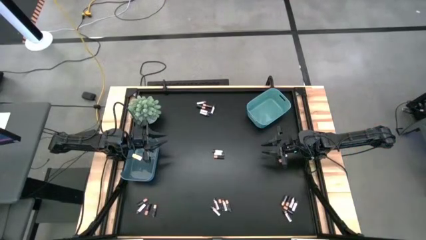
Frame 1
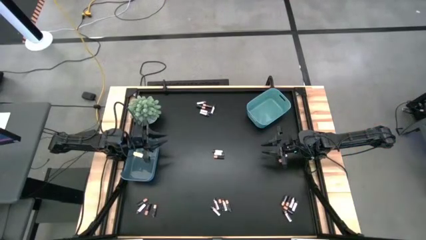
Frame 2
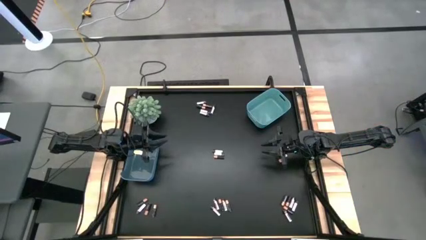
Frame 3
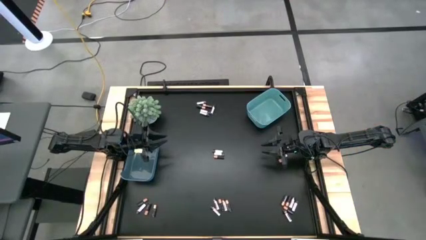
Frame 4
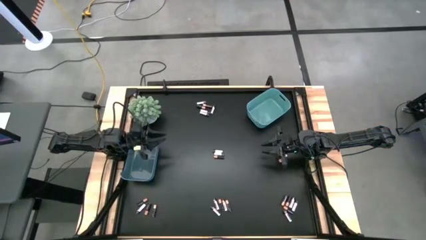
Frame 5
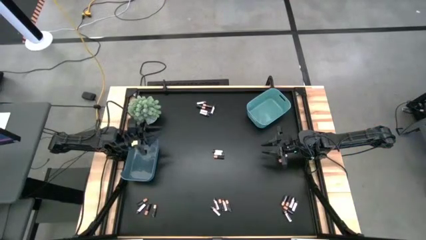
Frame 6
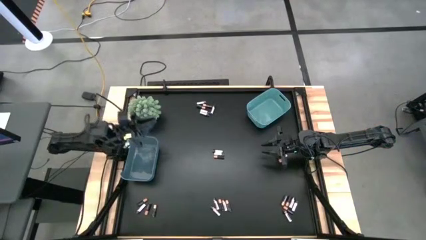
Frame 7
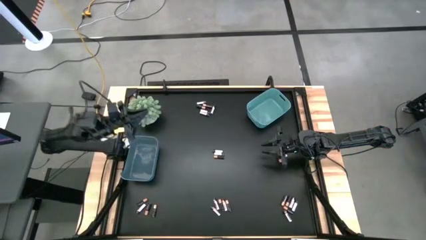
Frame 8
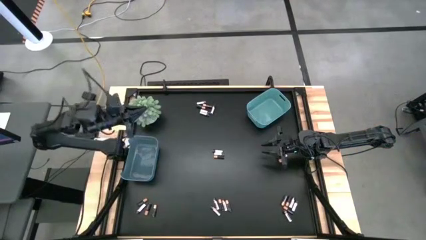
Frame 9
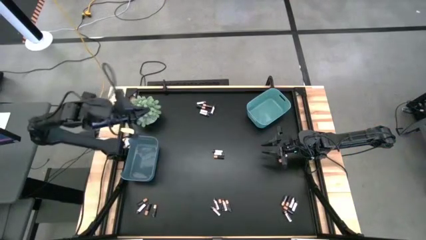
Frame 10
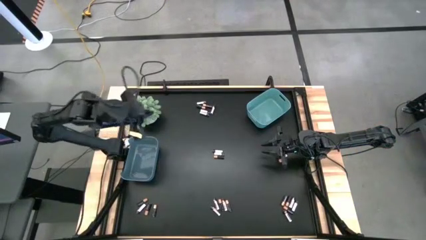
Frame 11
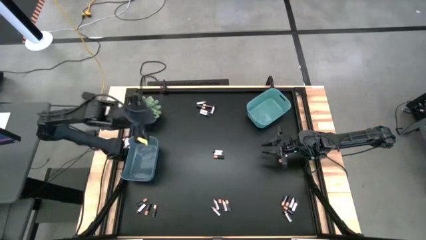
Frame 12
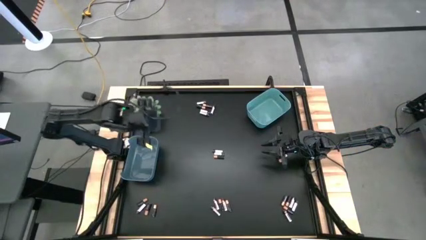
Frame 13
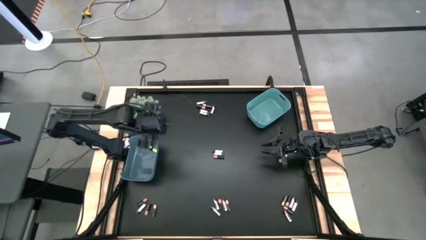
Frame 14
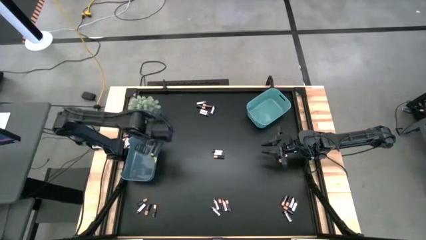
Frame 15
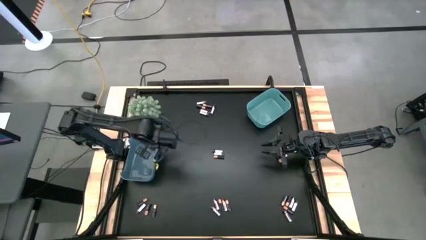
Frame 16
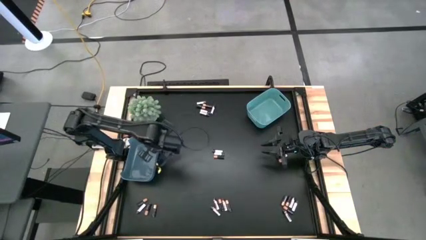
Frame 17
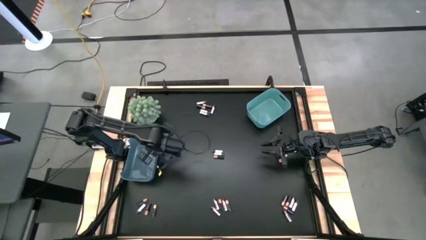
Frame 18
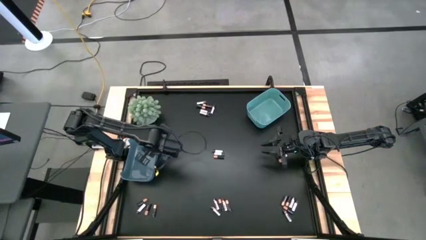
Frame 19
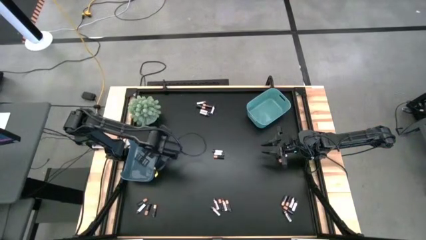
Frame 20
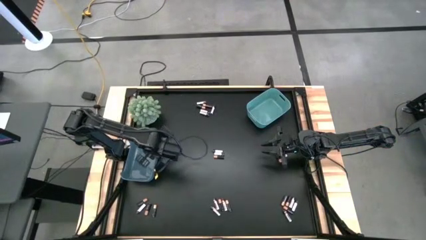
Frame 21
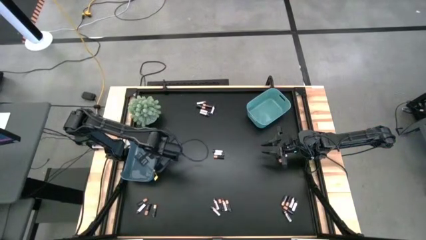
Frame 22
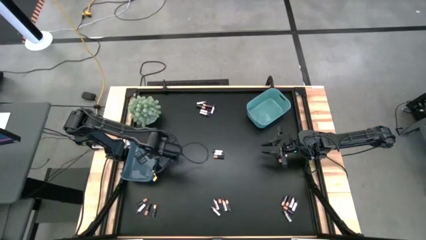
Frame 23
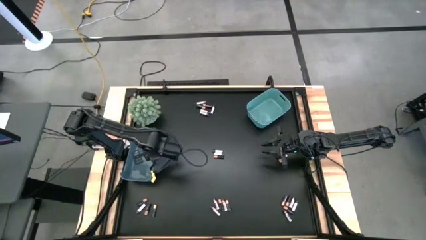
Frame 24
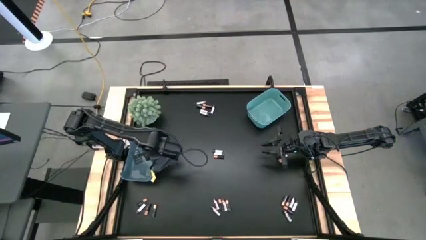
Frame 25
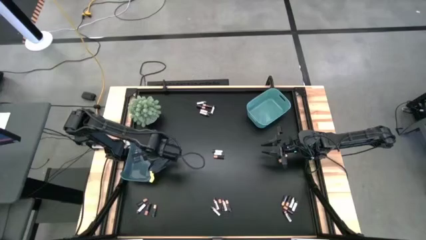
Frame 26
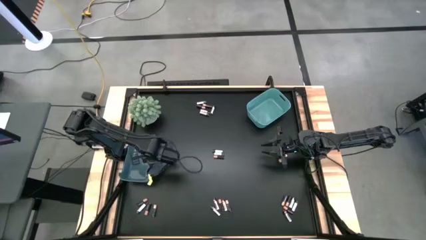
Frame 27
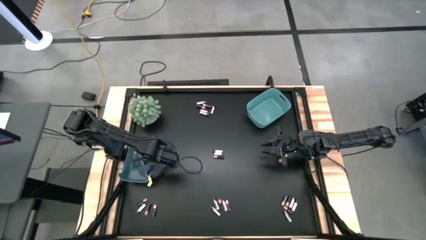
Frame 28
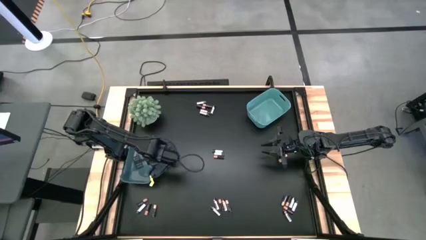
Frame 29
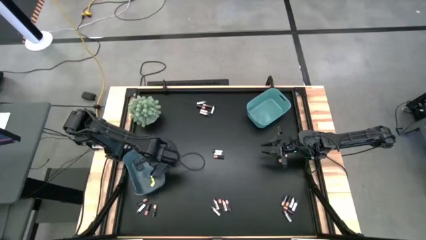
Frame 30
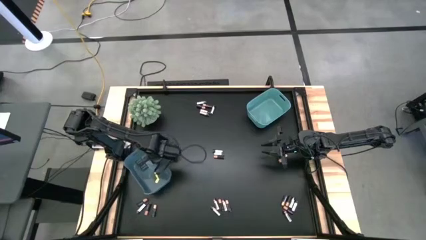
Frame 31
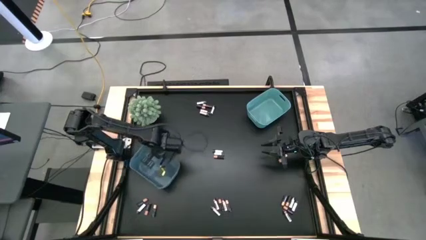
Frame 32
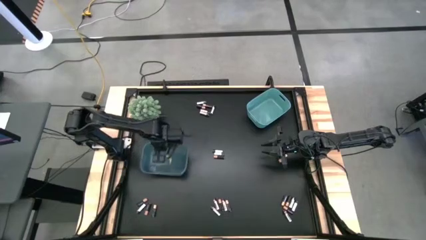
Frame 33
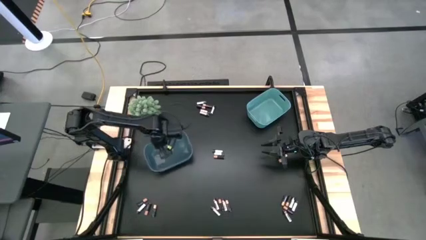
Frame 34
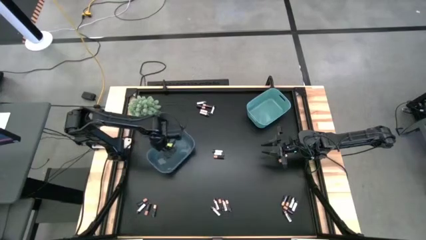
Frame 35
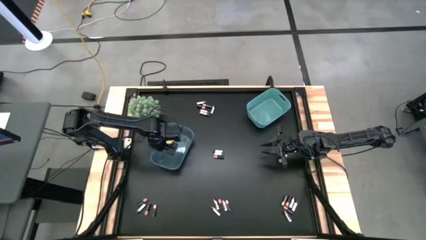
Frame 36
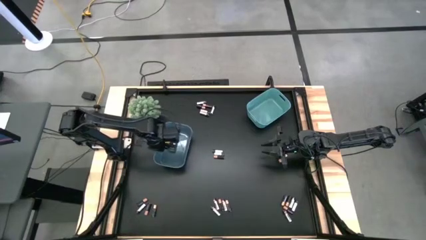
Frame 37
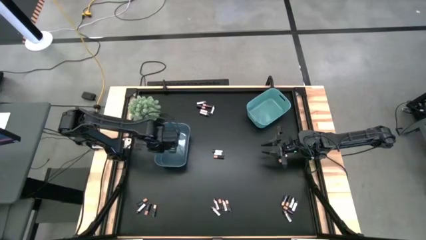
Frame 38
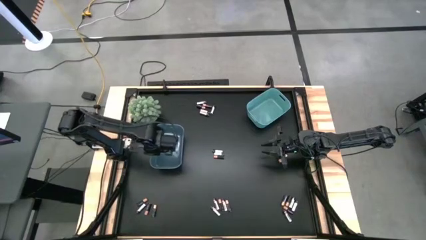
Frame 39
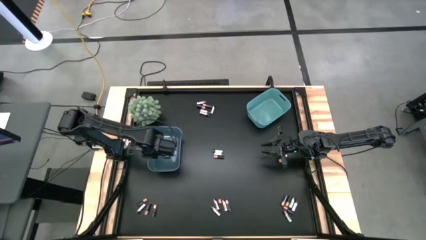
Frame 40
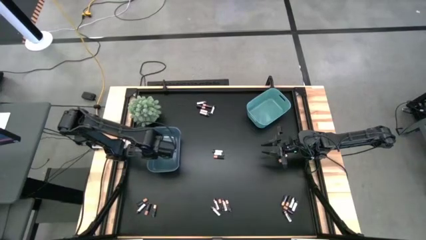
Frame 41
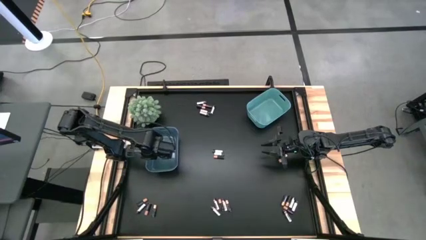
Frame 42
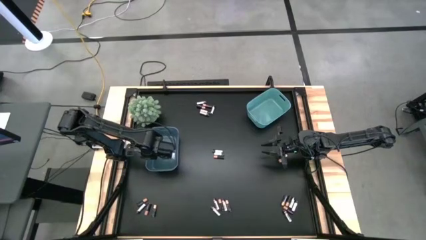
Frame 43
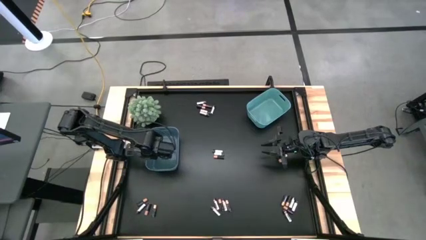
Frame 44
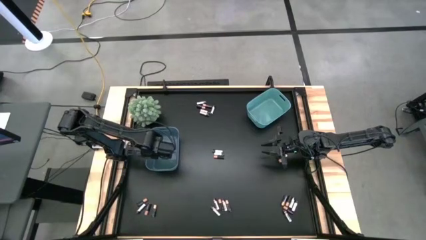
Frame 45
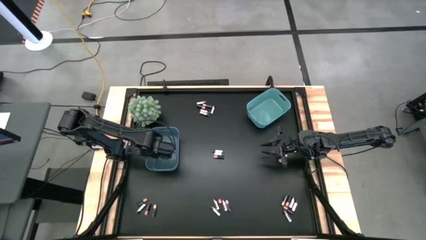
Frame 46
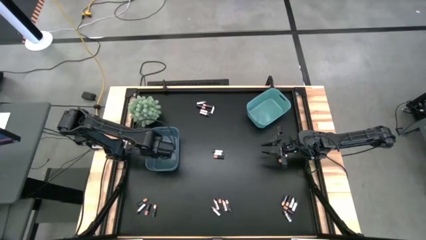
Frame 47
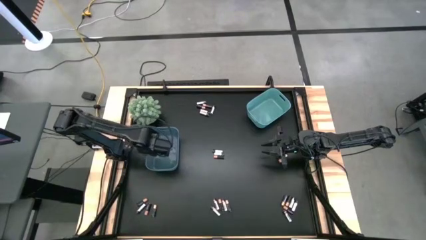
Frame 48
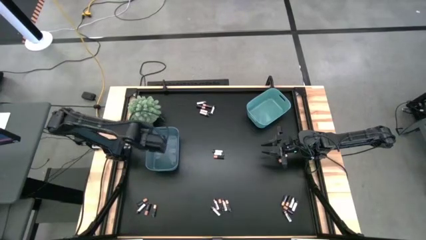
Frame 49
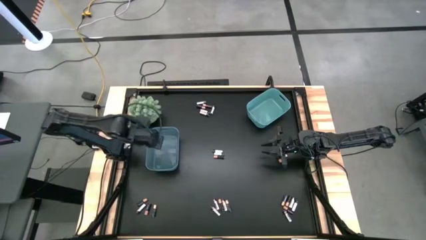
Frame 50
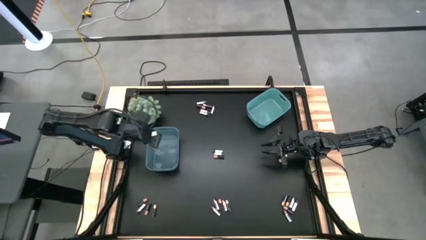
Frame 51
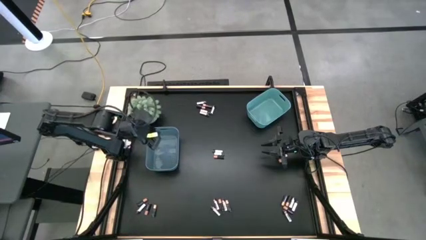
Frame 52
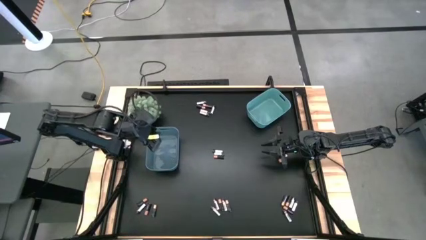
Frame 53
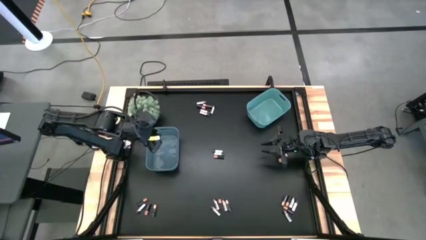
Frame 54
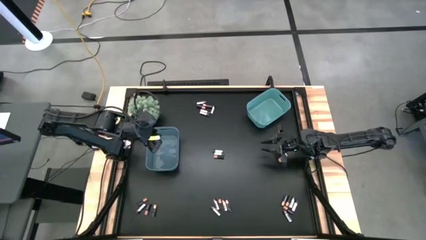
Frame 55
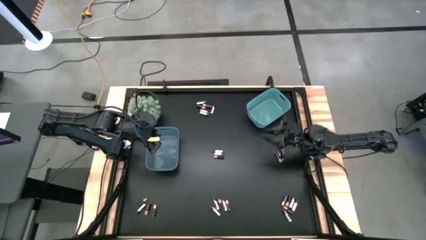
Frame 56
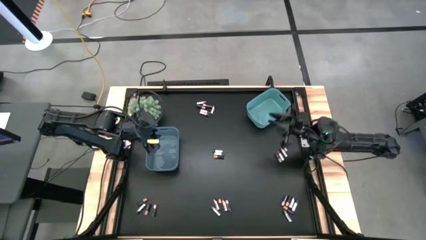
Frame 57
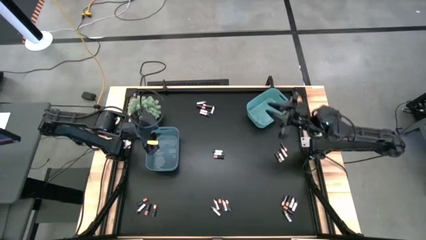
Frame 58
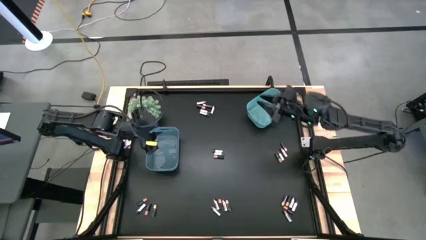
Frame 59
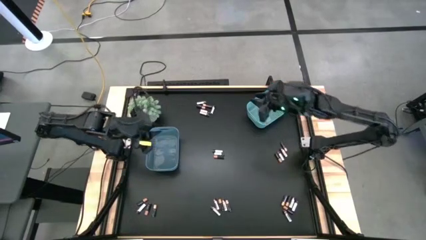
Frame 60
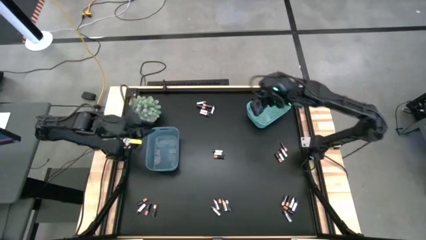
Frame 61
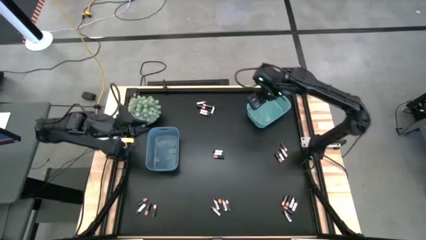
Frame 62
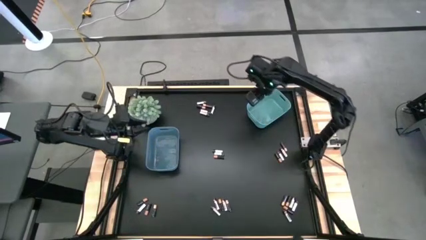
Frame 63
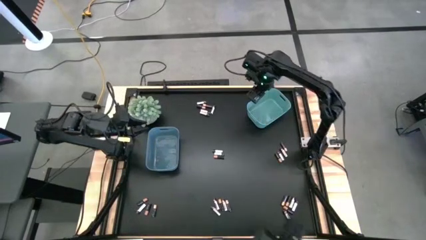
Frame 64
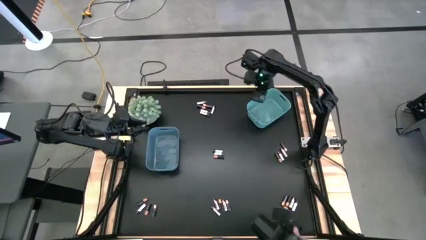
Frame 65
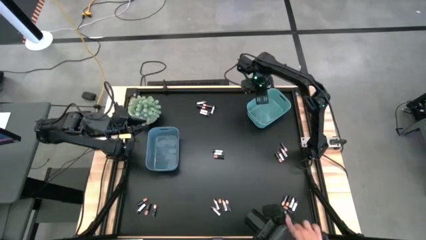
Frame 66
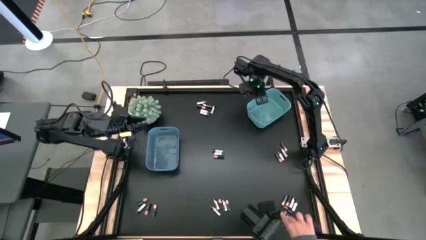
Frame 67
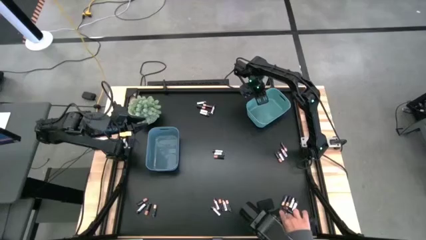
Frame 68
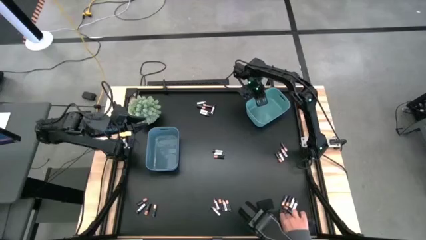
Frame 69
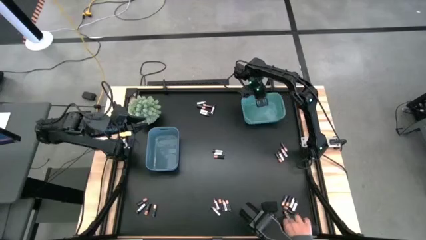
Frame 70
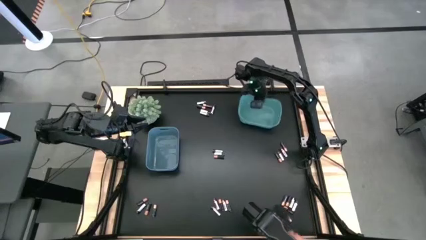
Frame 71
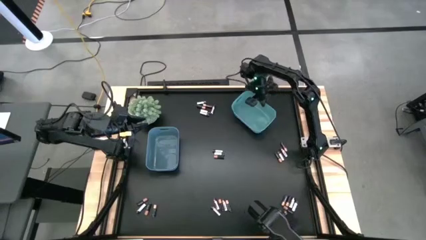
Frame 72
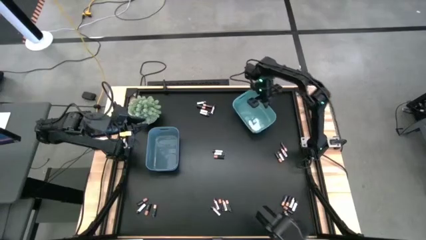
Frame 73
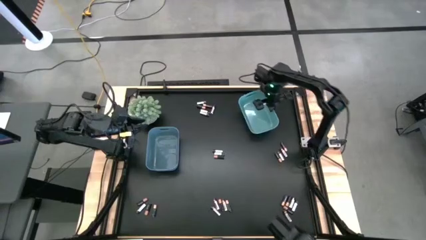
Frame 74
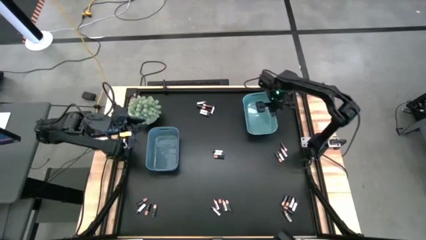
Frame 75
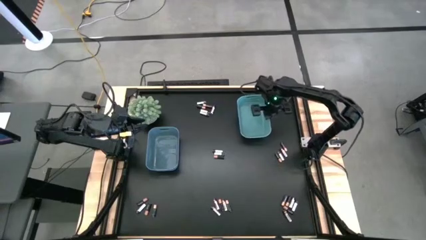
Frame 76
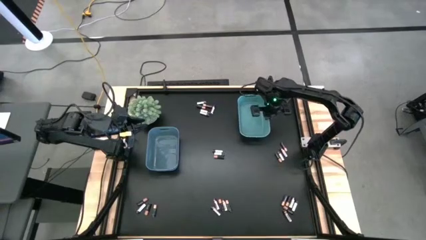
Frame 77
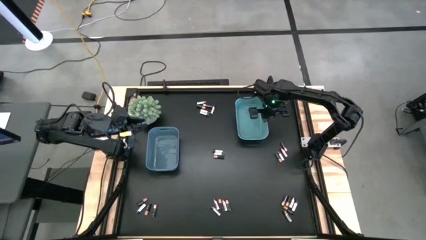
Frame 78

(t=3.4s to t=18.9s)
Task: Sort batteries
Prepare the bins

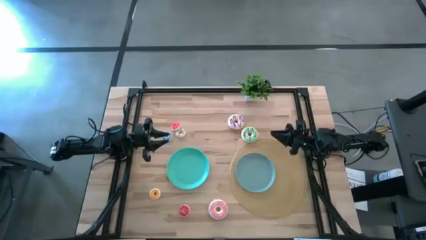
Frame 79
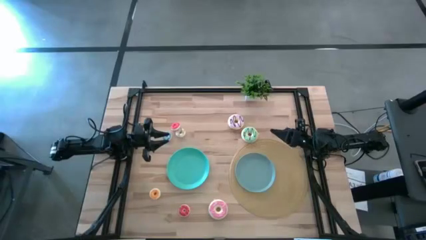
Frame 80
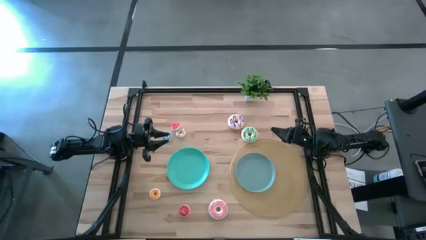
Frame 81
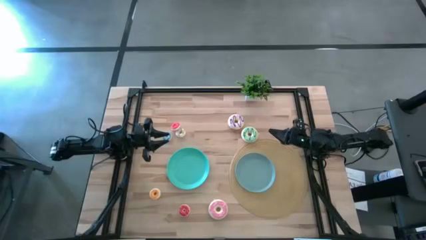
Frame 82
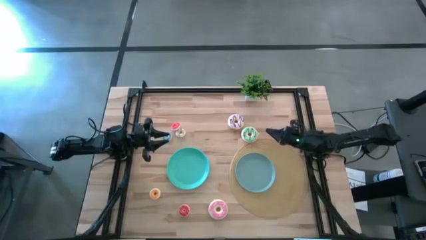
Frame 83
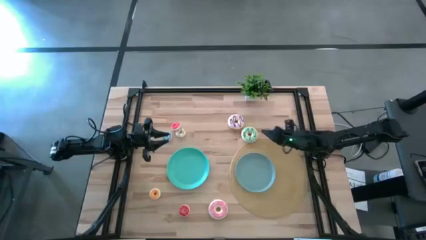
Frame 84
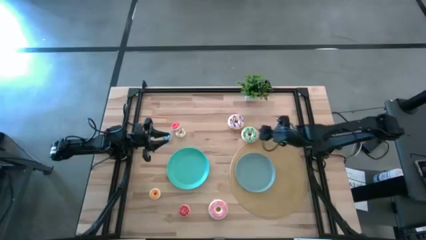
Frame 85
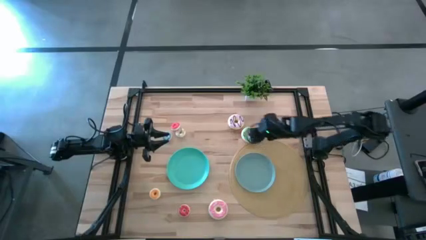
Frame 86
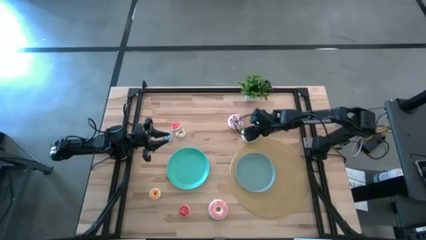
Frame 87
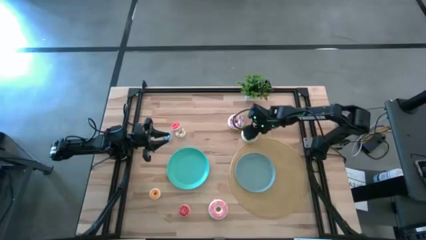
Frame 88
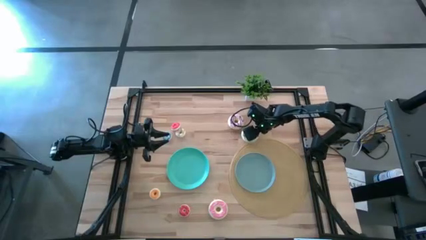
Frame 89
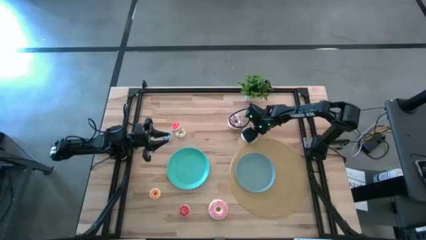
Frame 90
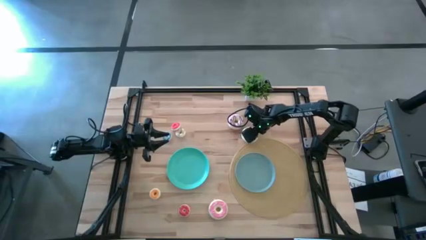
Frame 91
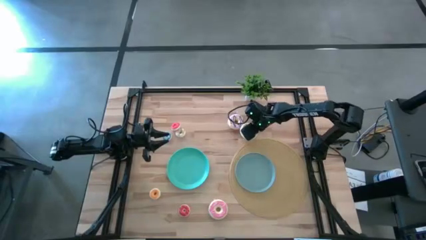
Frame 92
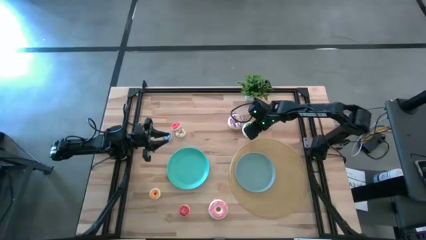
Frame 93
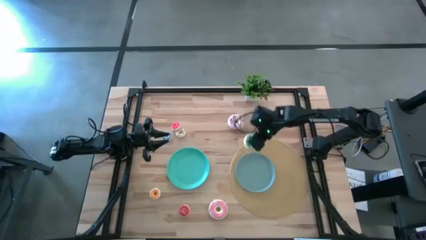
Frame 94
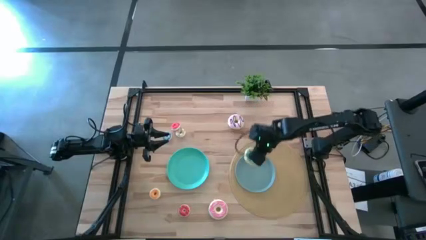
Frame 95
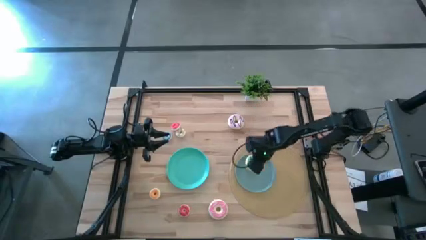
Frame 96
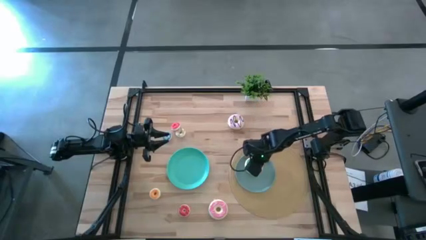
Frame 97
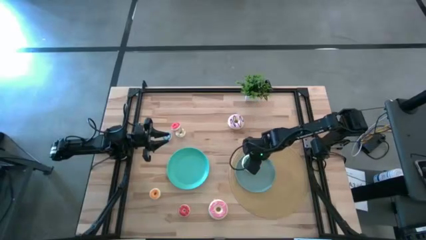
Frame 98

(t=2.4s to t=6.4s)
Task: Pick & Place donuts
Put the big blue donut on the blue plate
